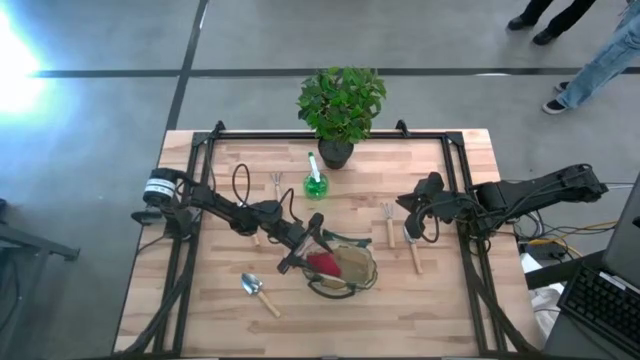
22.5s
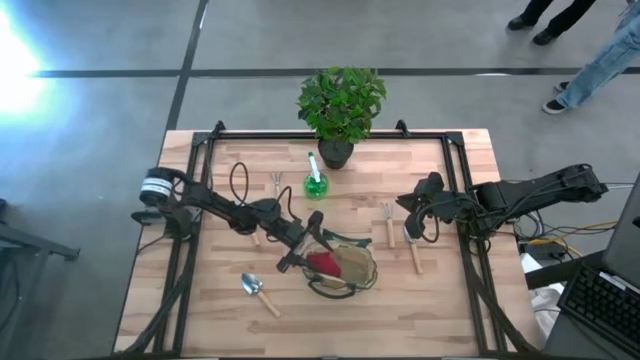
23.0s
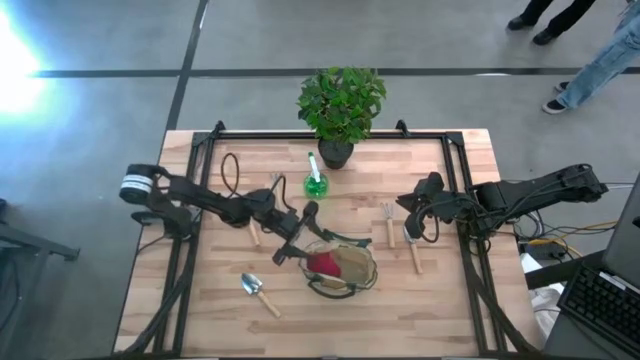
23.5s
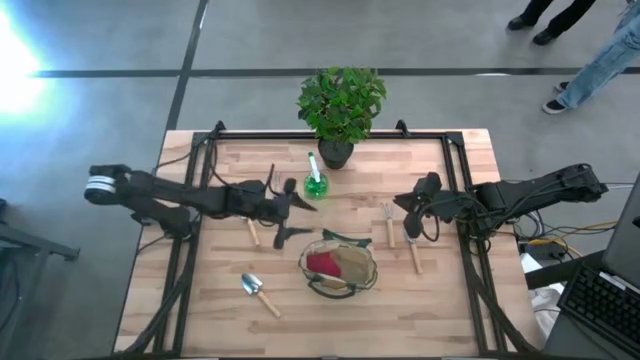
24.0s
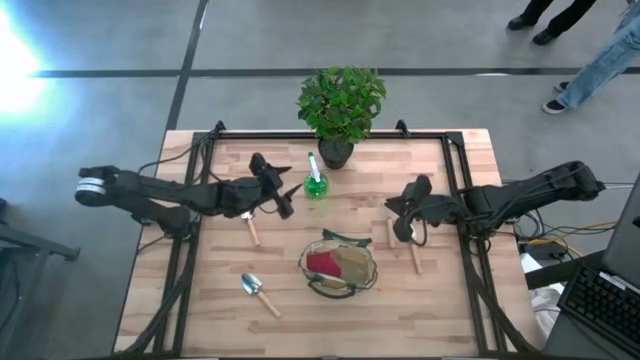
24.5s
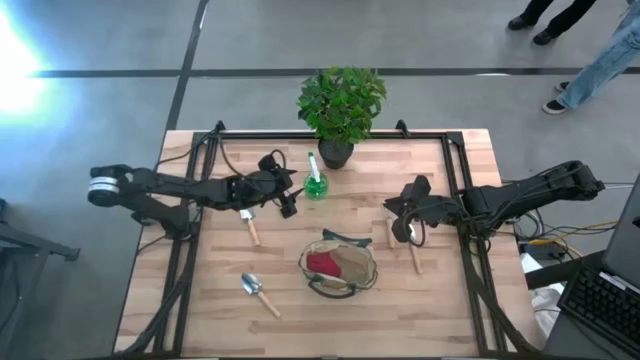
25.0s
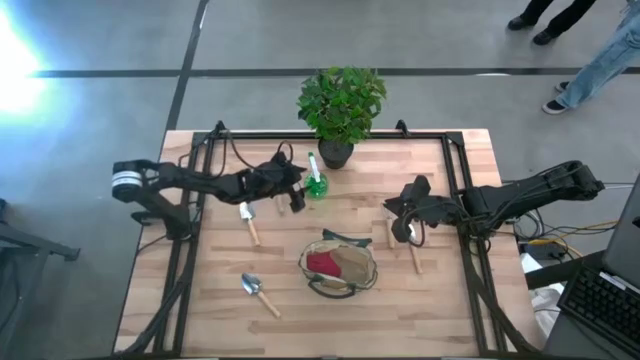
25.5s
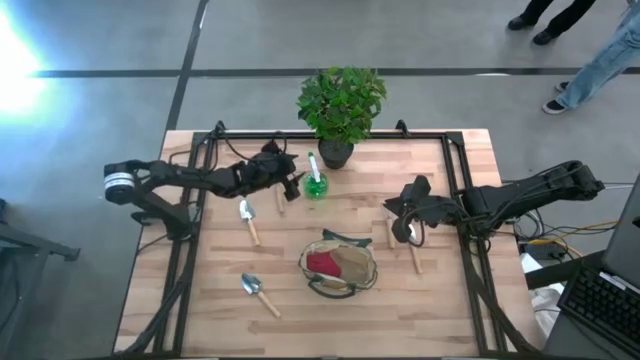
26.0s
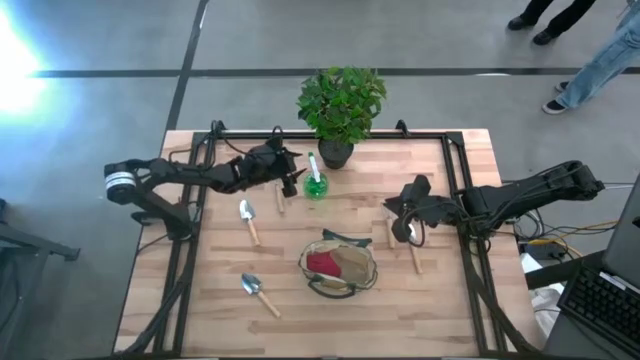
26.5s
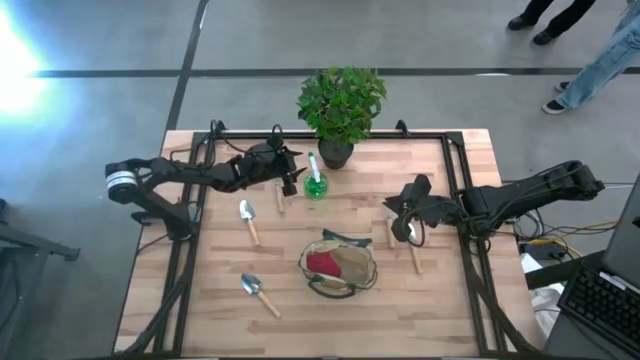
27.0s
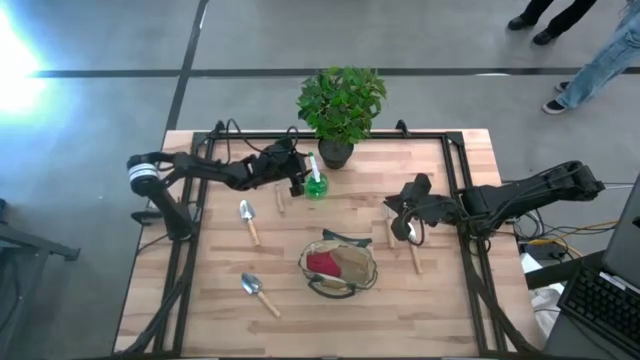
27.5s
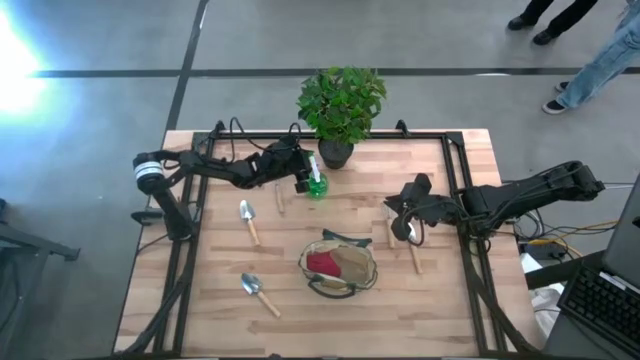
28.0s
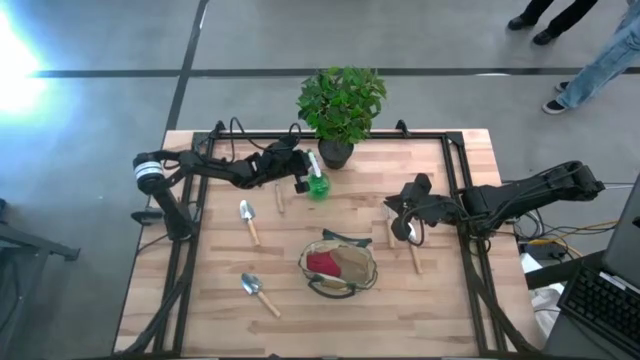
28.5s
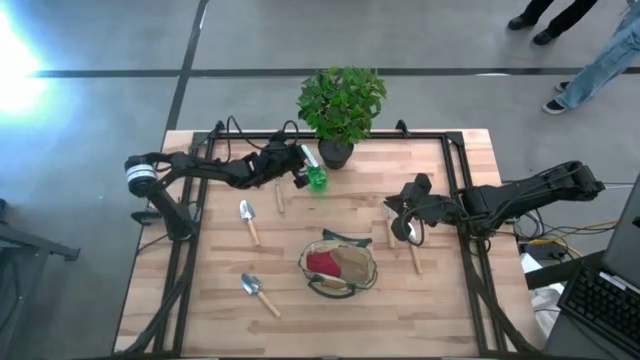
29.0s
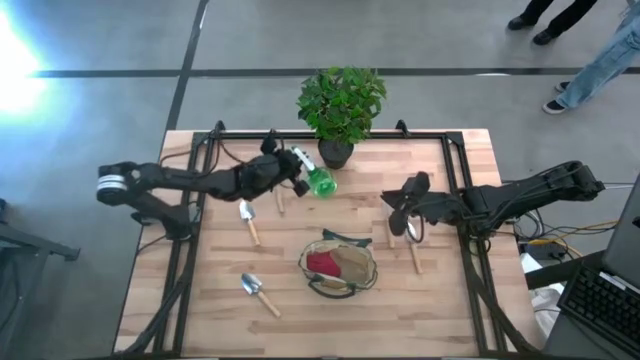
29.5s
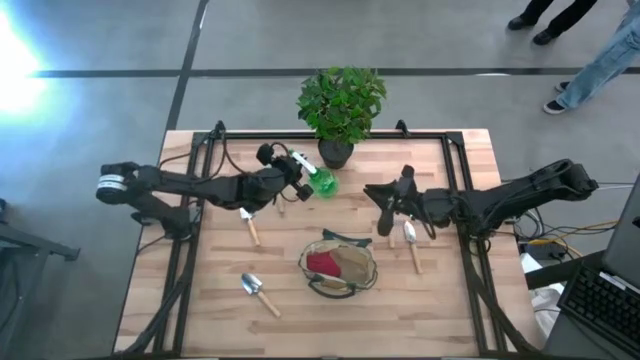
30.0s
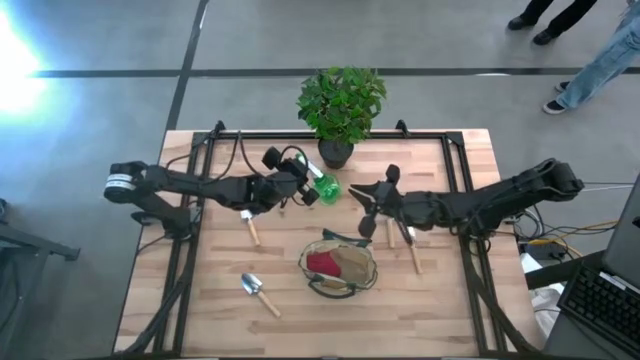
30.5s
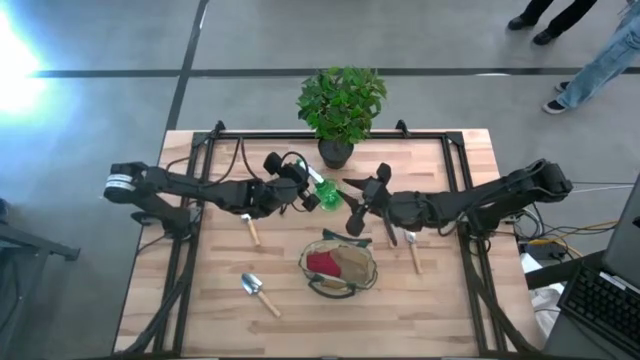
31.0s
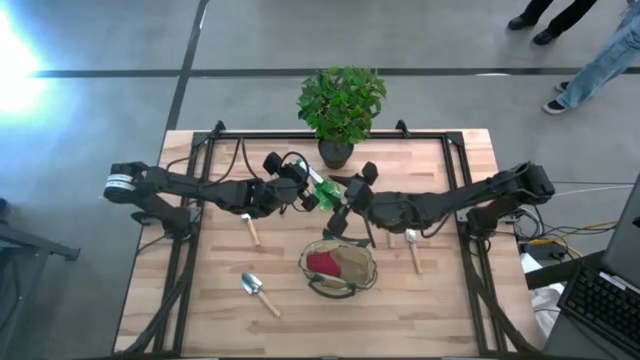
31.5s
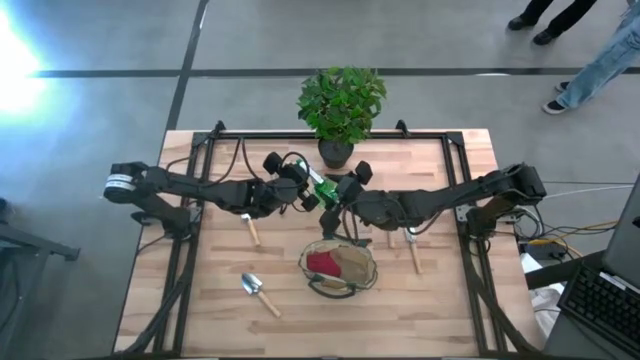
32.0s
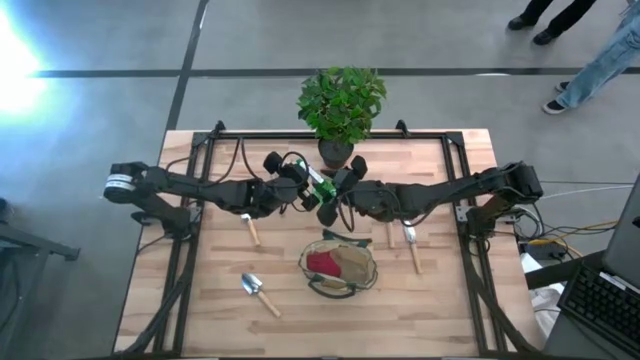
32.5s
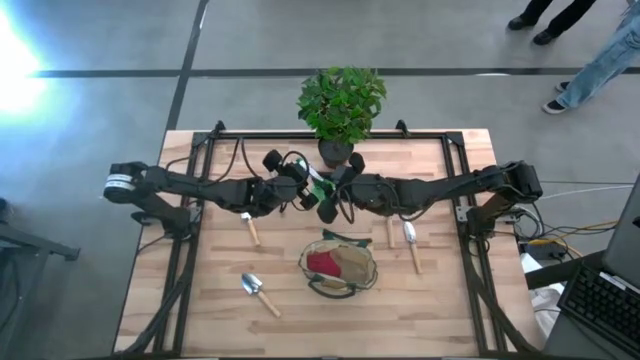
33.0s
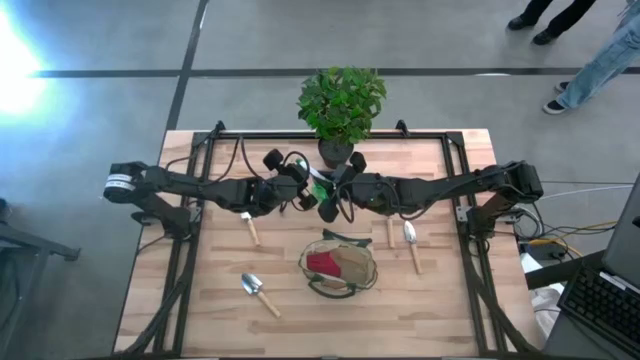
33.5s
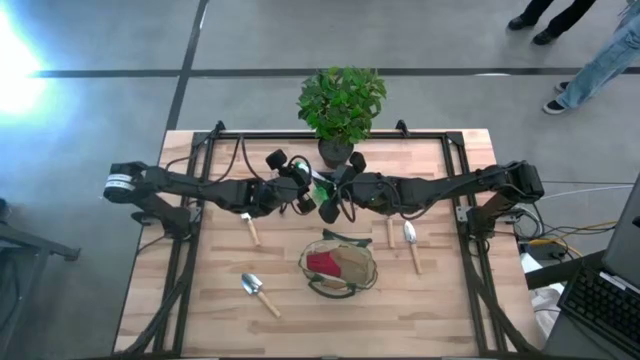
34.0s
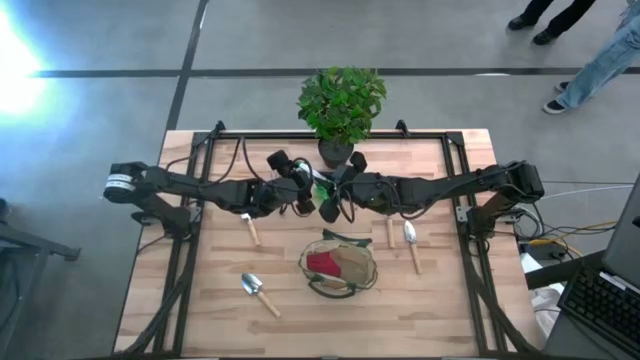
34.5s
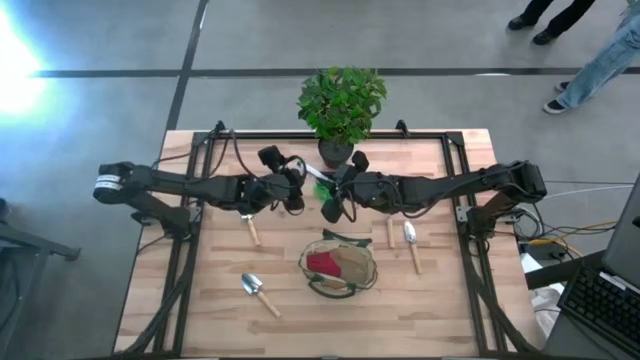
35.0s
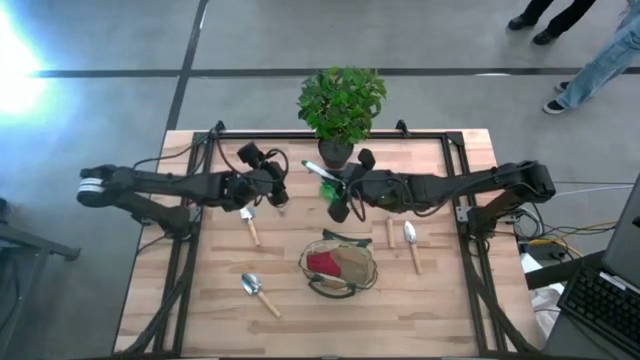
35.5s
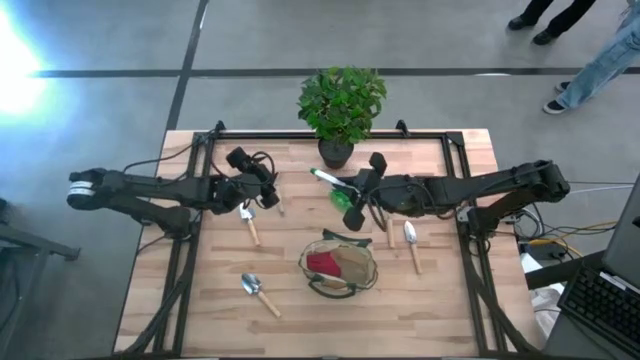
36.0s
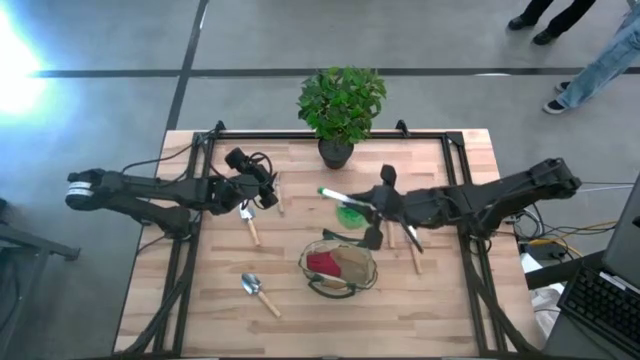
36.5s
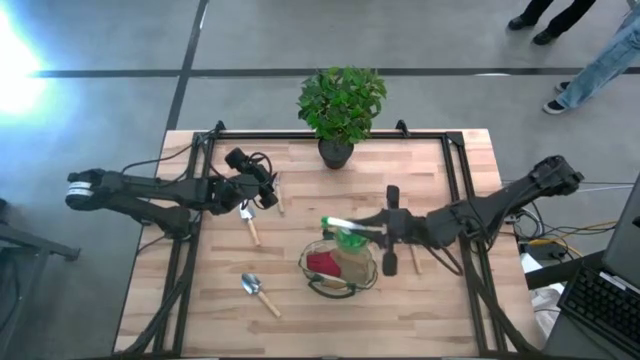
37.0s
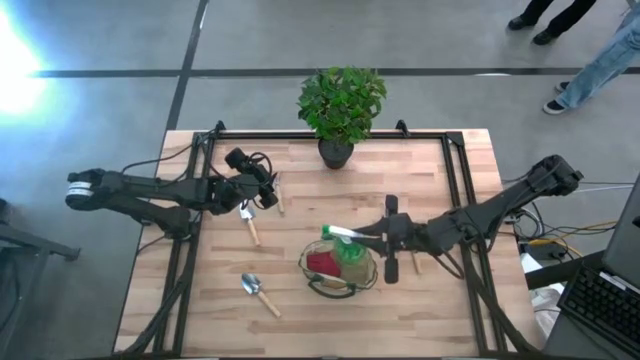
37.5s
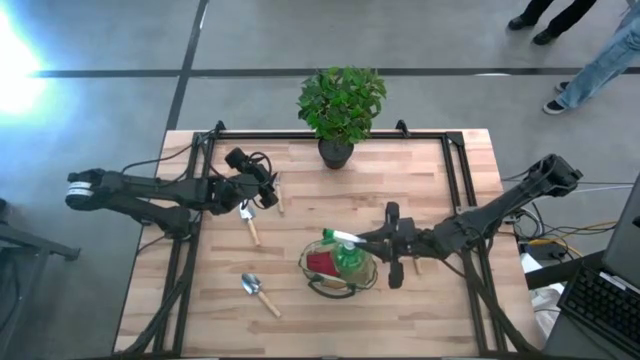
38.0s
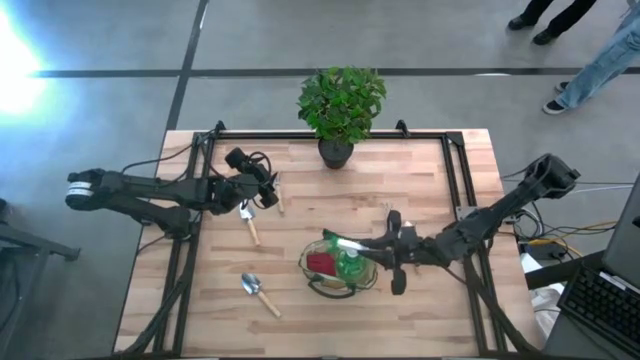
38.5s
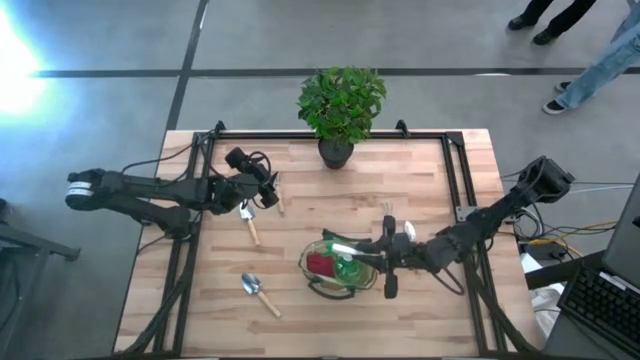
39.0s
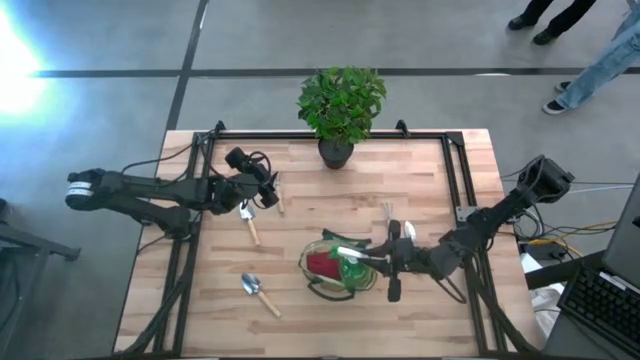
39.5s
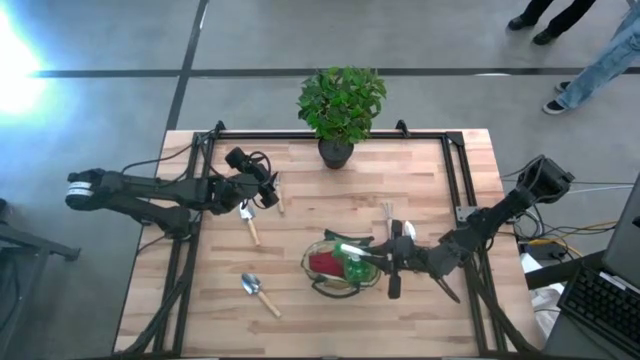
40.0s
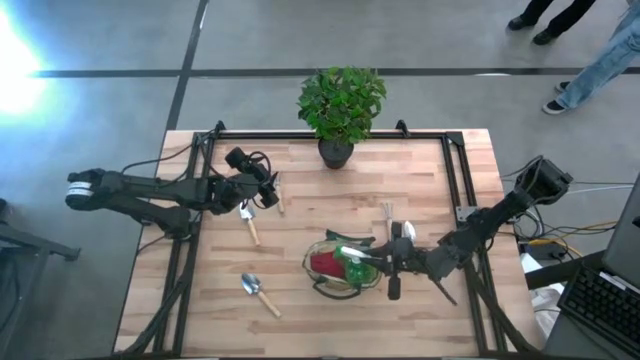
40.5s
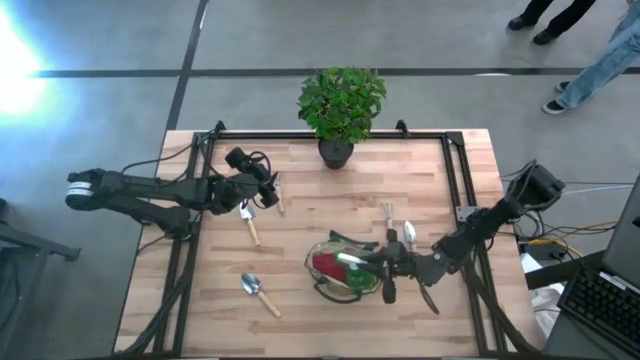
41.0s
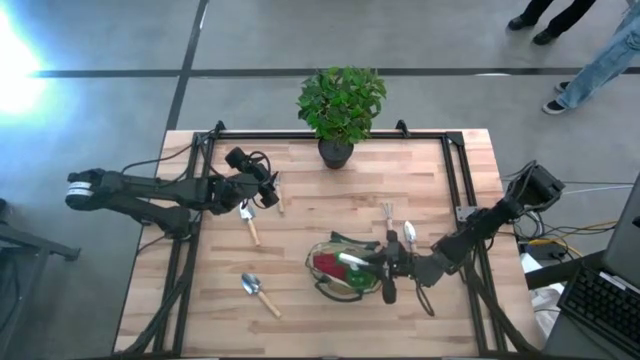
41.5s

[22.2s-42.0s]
Task: Pick & Place Garden tools in Gardening bag
Put the green spray bottle into the green gardening bag

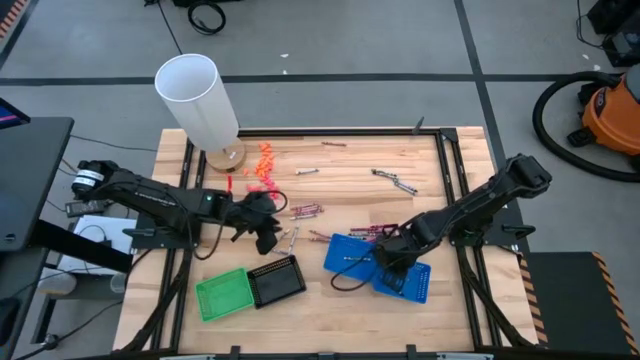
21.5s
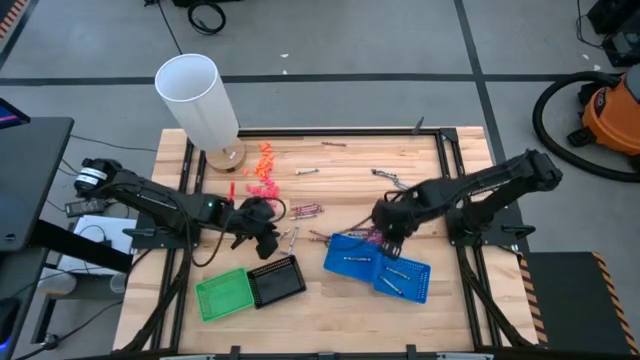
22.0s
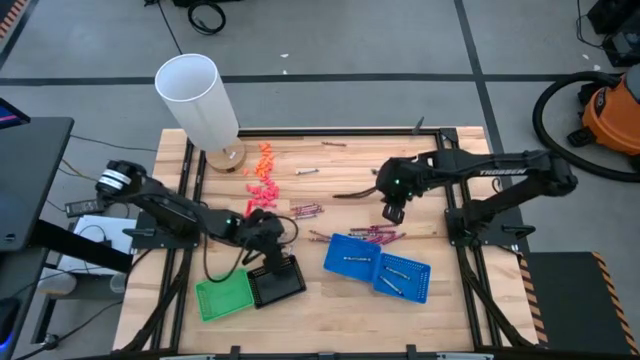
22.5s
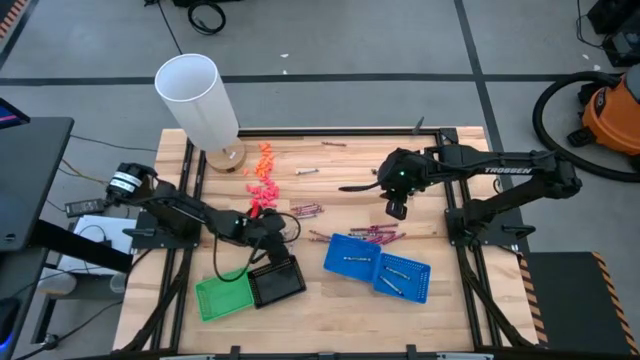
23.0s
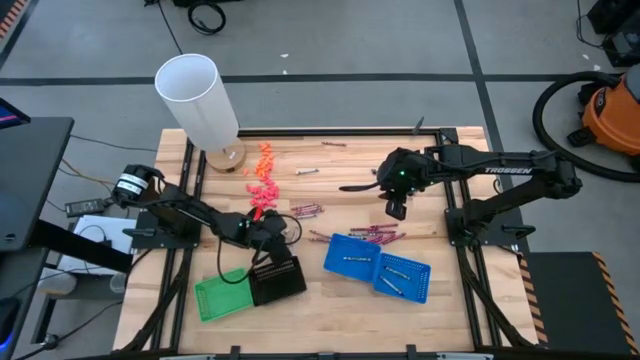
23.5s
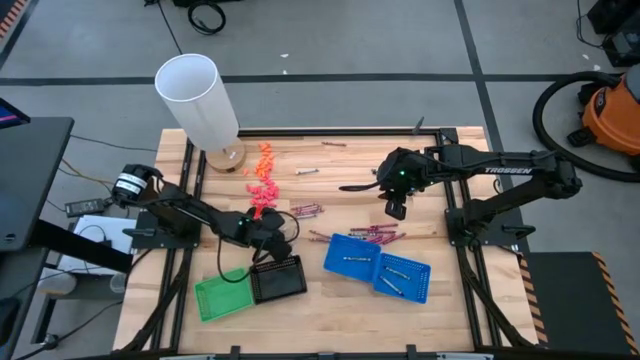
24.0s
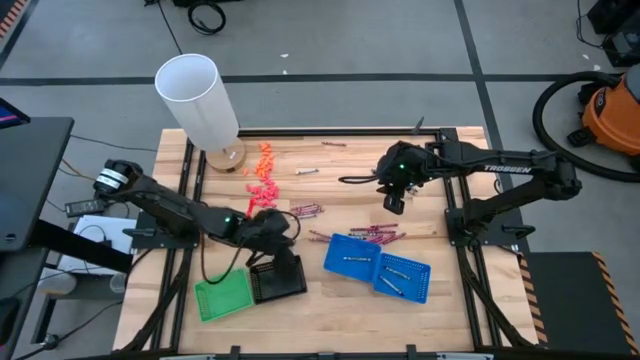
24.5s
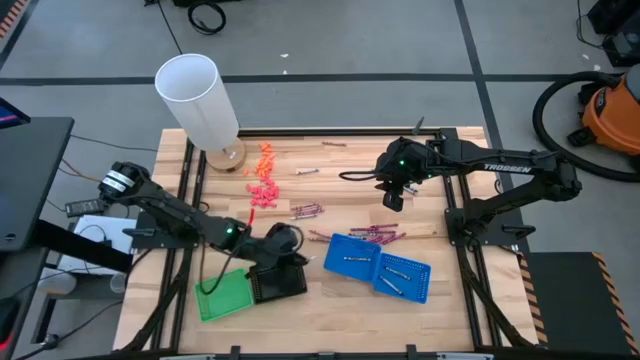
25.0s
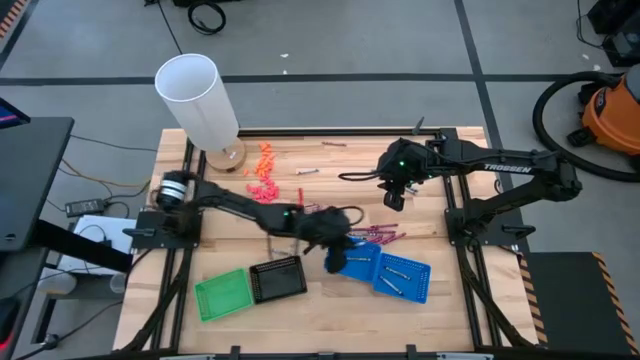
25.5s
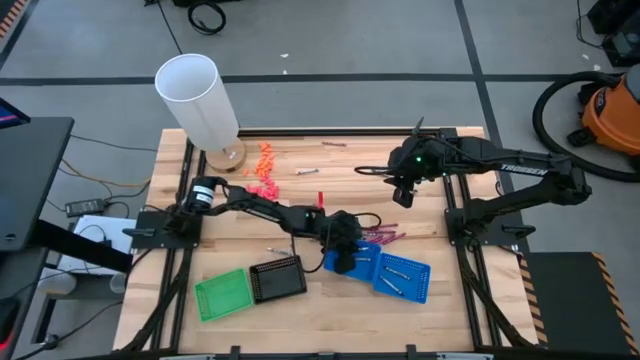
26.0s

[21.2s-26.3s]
Task: Sort crayons
Put the white crayon into the left blue bin
